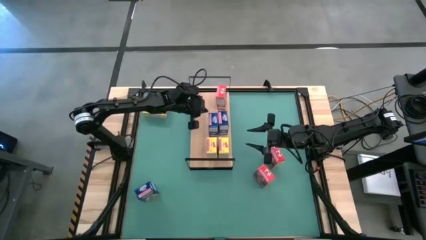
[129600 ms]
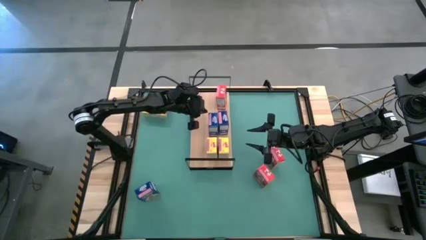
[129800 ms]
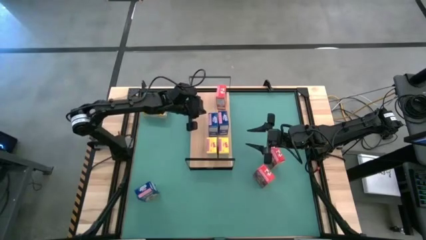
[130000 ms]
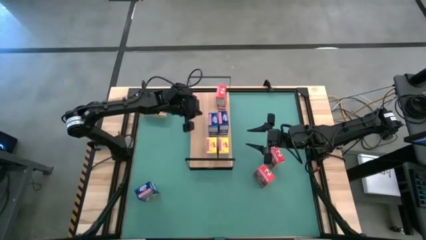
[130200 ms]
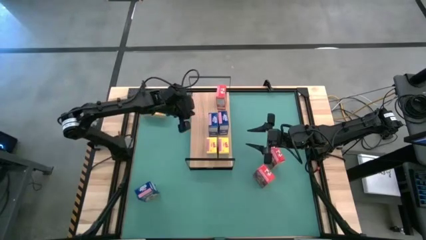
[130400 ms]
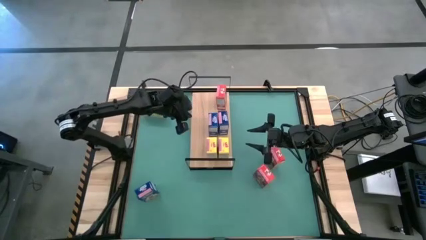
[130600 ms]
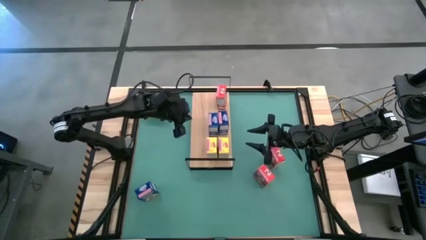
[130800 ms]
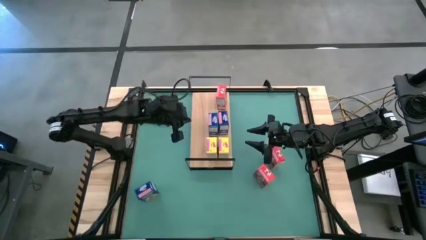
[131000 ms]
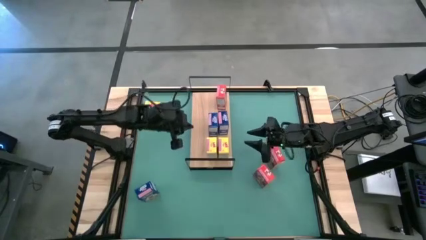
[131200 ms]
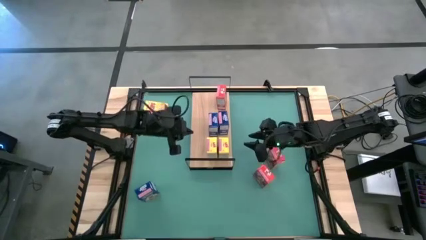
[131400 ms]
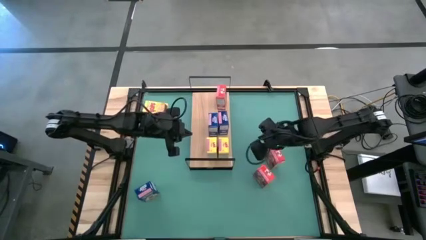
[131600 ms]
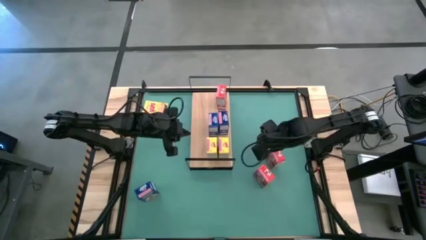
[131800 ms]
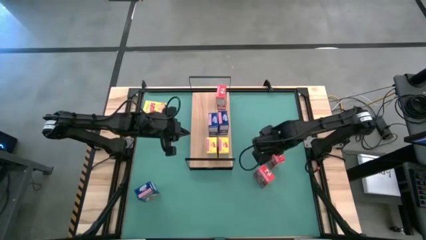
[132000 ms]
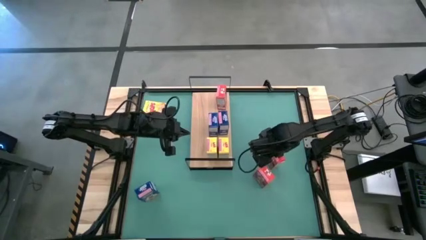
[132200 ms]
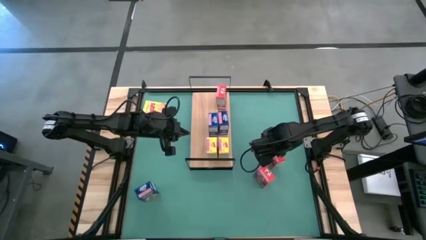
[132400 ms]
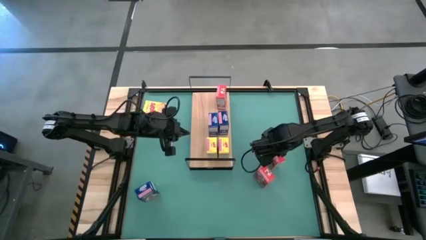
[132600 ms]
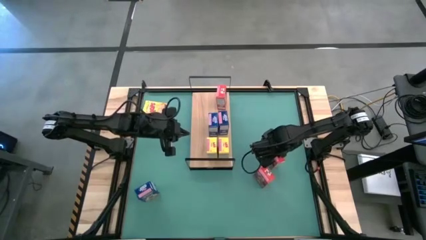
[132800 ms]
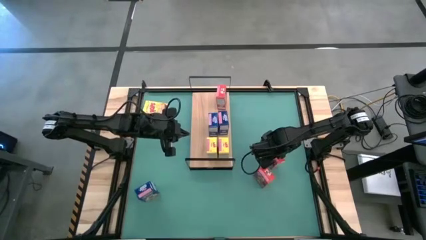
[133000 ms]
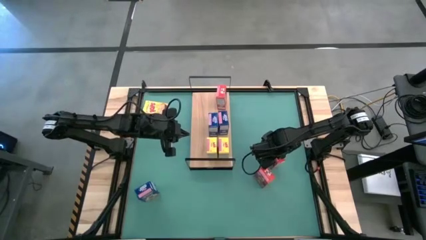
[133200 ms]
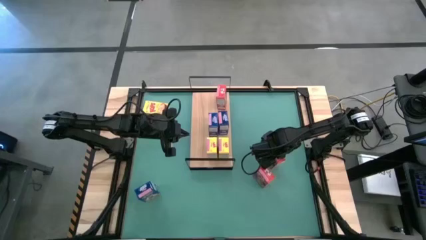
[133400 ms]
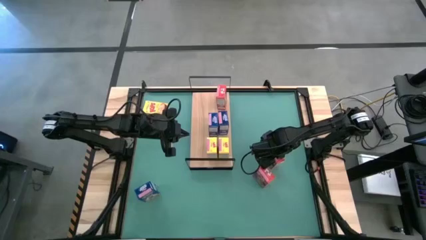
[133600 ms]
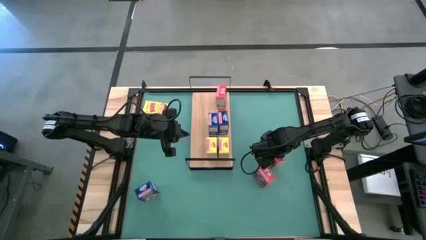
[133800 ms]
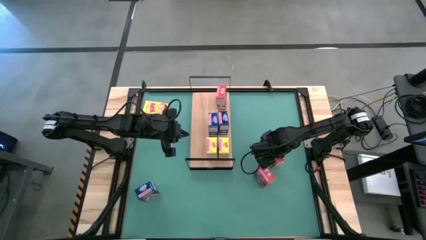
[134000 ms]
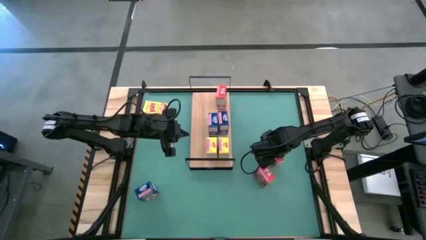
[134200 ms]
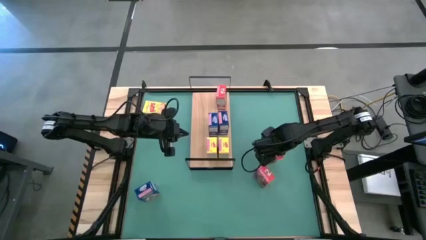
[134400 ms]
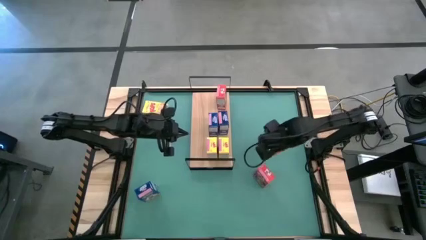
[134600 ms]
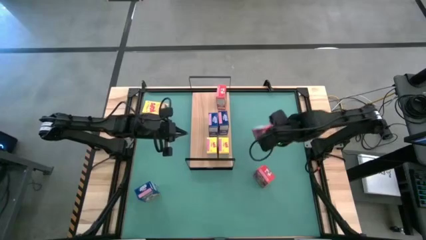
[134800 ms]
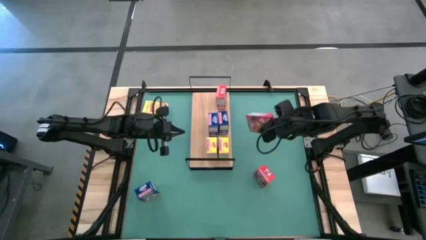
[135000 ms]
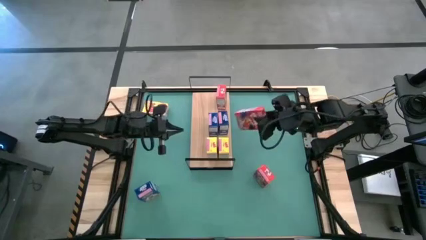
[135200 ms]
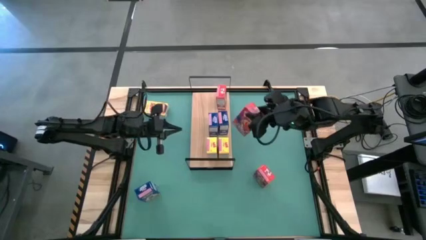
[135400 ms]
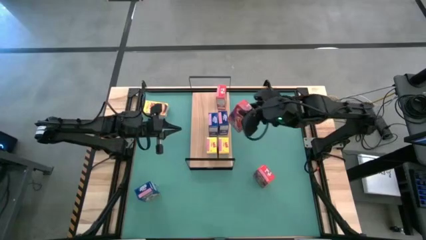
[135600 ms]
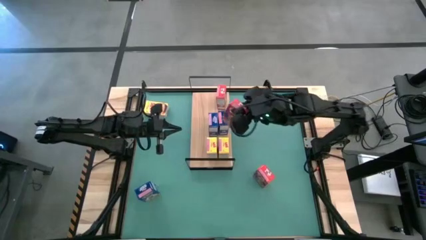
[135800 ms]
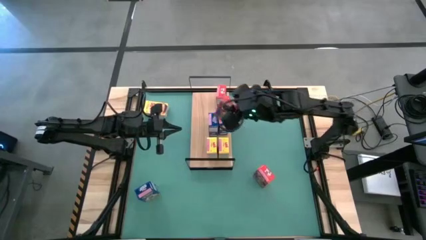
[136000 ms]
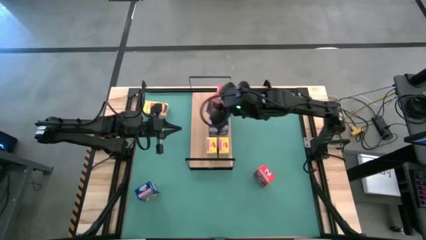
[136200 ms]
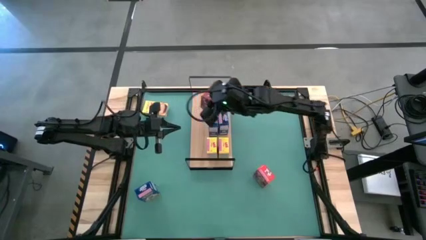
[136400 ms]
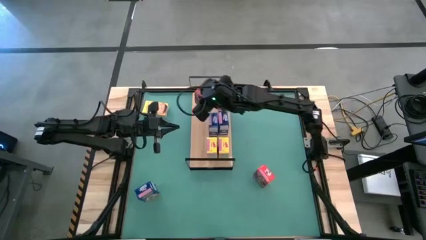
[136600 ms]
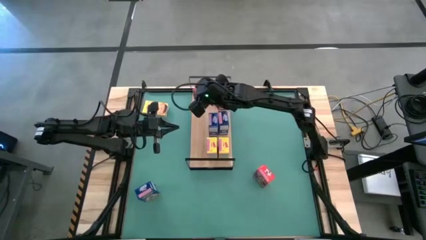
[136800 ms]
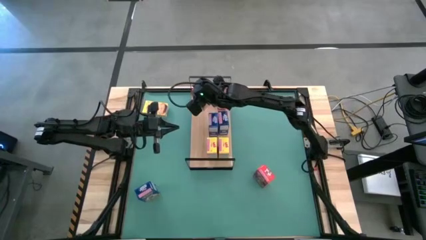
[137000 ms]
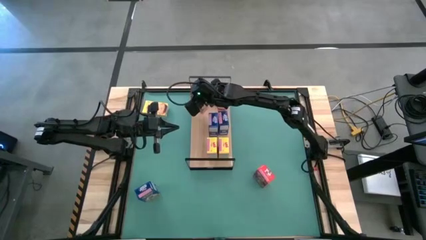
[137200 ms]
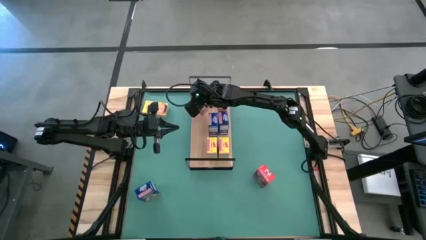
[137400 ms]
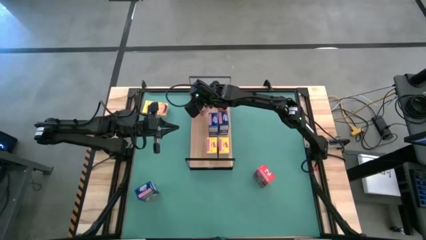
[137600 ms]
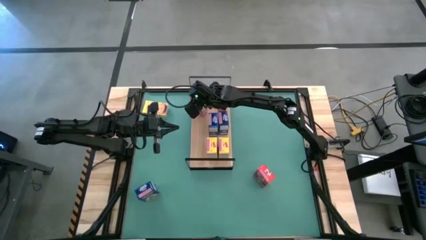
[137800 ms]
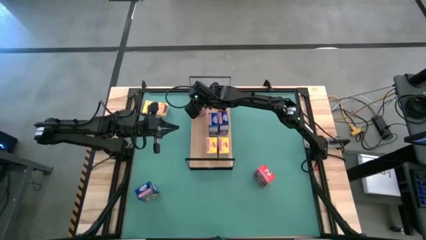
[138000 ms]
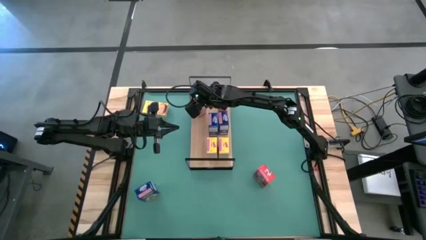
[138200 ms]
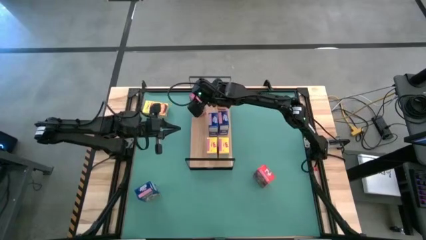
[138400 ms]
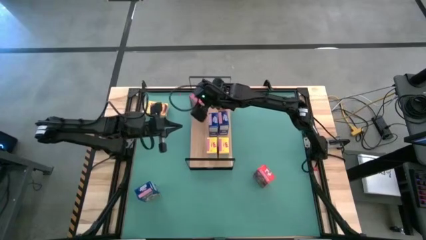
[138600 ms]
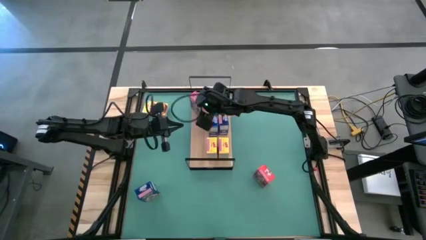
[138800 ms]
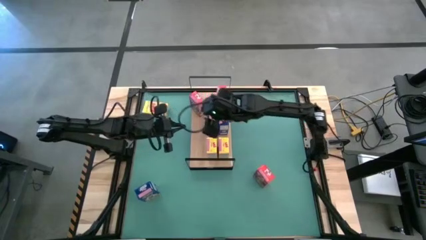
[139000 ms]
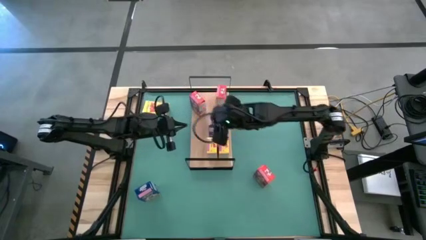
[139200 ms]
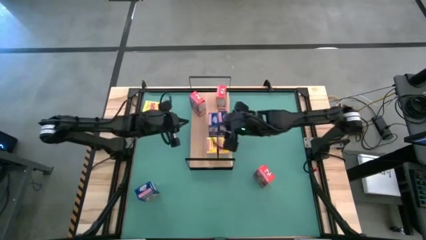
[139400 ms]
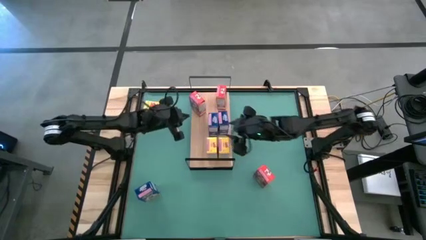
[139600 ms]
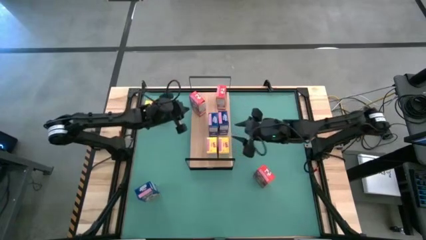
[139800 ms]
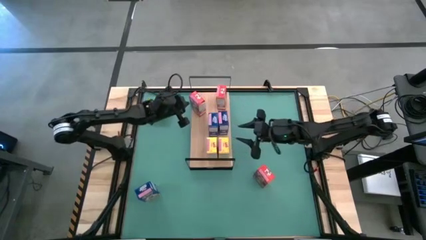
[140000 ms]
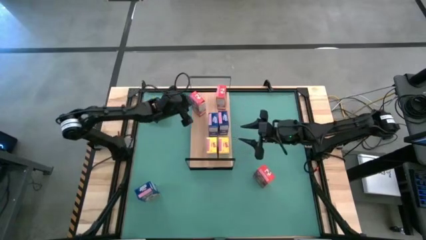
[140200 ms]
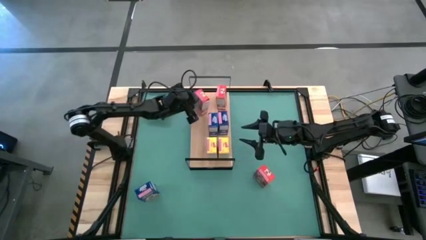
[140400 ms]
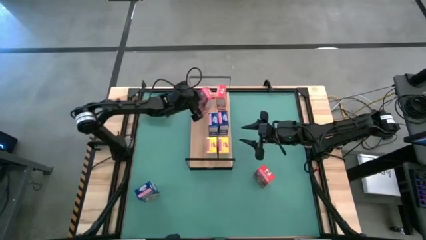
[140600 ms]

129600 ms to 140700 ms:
Task: Stack cereal on shelf
Put the top red cereal box on the shelf aligned with the other red cereal box

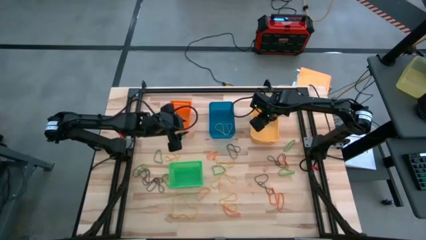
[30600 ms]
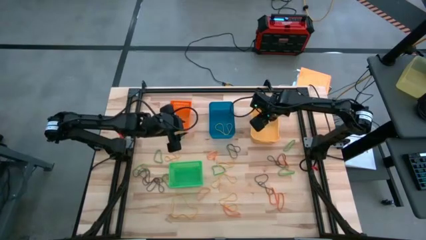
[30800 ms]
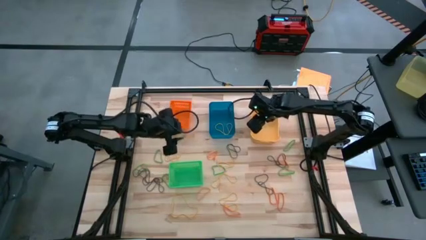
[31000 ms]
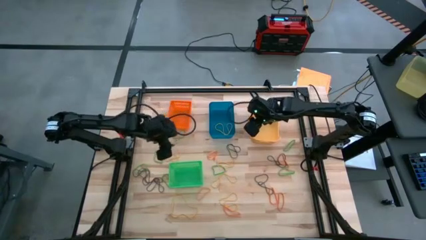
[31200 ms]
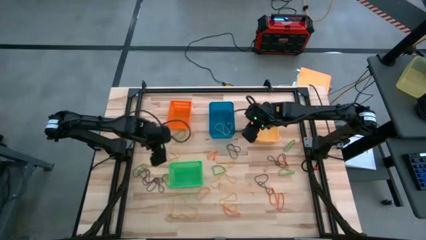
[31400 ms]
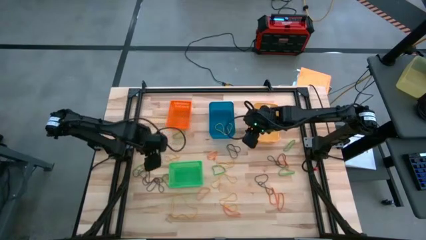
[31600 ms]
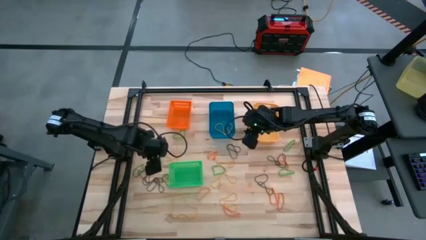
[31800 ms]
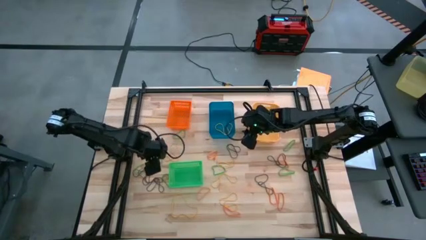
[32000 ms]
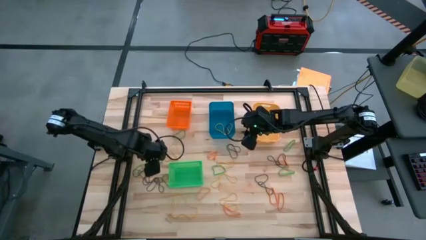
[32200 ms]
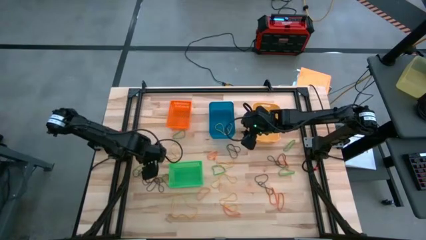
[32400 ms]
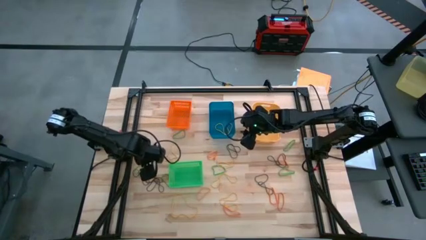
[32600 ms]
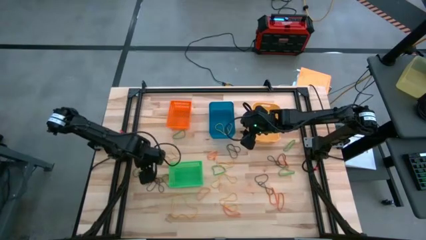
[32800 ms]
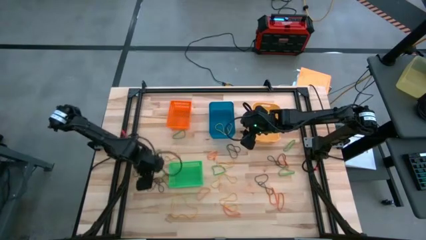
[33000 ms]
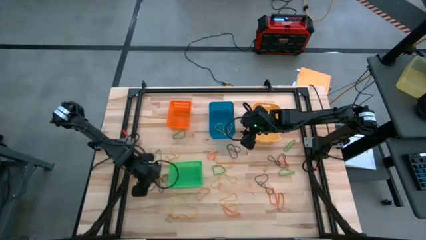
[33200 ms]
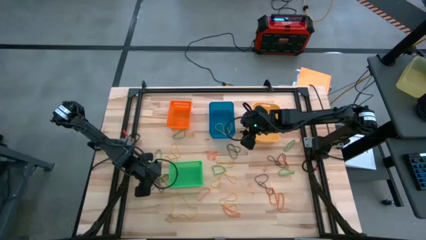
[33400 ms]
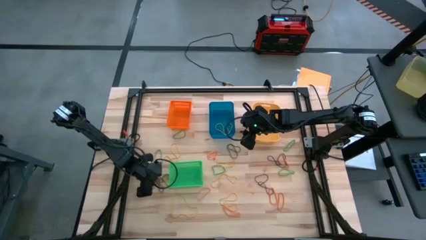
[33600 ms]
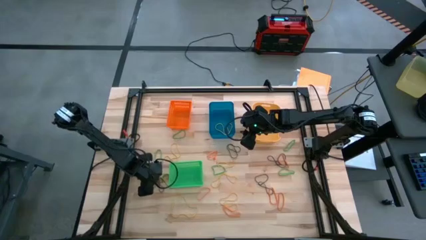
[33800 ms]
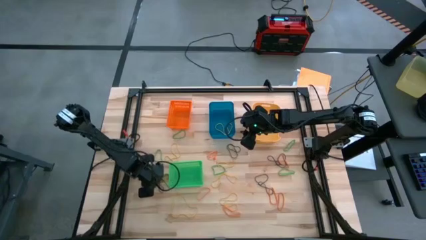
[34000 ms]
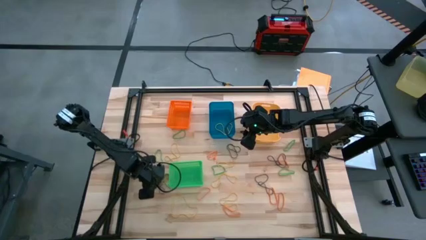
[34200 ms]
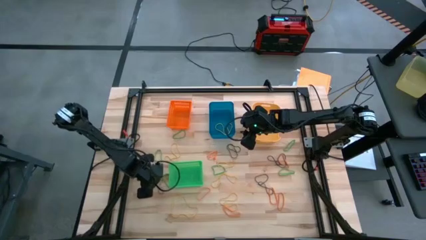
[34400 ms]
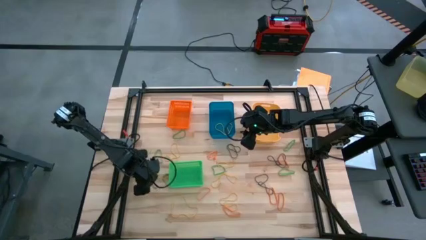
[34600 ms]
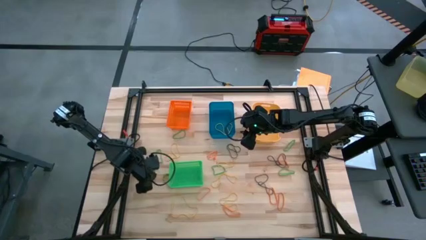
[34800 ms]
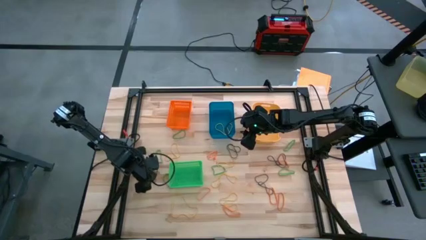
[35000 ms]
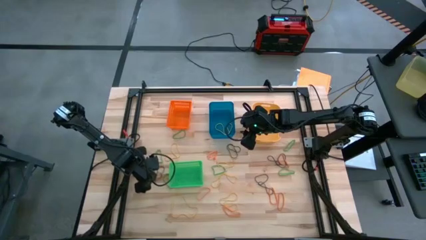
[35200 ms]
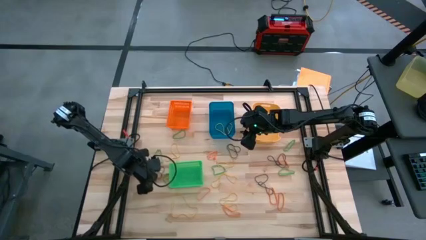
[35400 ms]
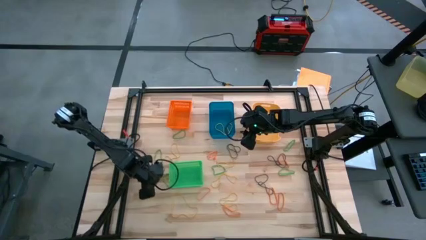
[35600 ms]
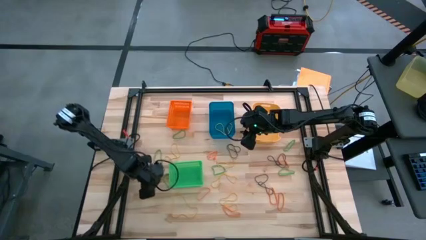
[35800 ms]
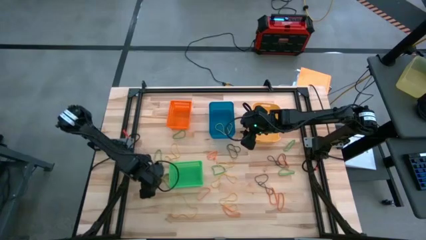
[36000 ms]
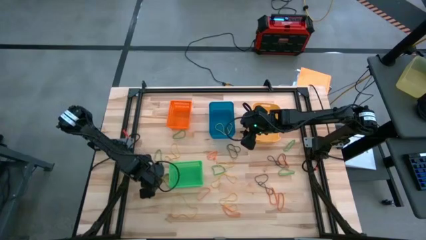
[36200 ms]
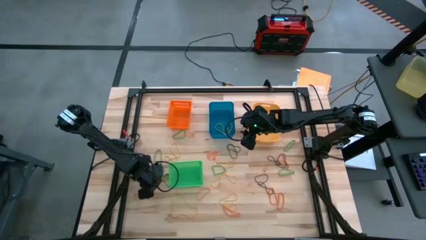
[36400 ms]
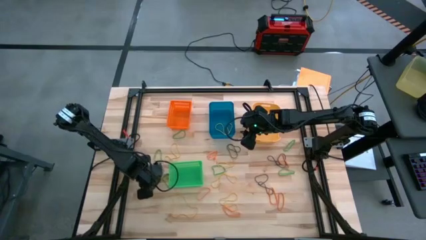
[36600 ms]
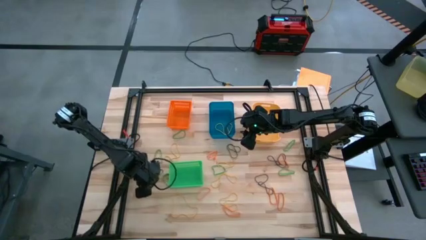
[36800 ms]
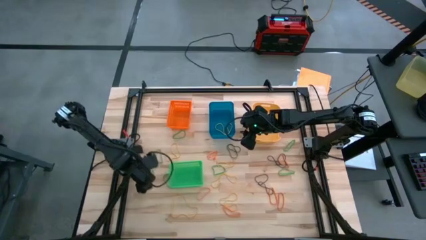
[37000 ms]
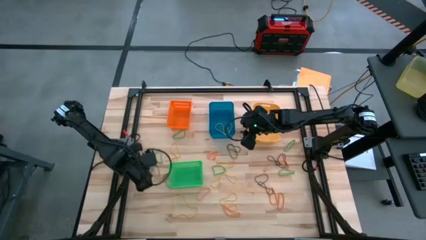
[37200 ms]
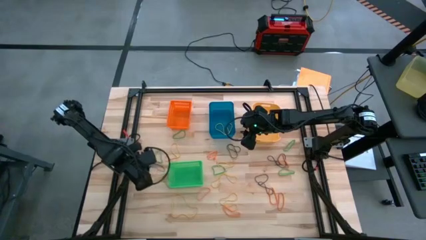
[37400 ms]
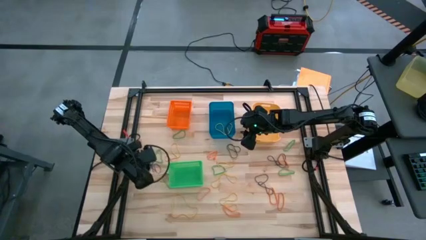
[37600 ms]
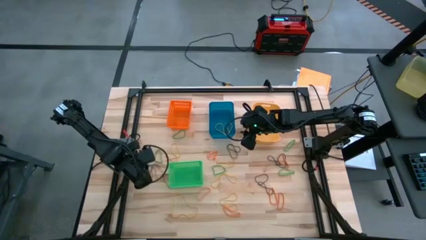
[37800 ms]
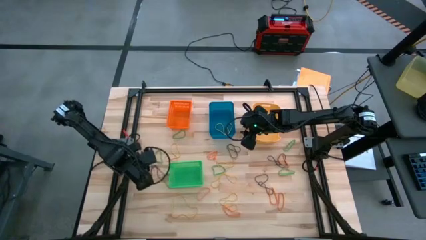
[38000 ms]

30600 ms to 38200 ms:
Task: Sort rubber bands into baskets
Put the violet rubberband into the green bin
